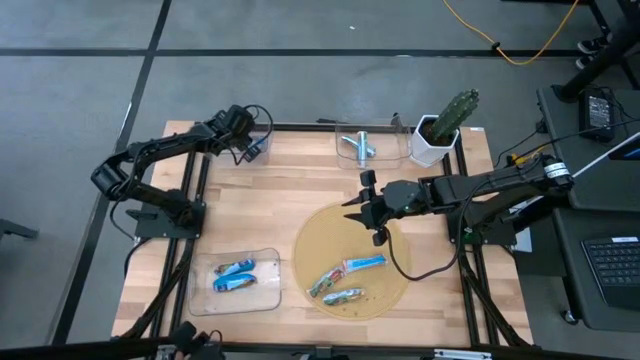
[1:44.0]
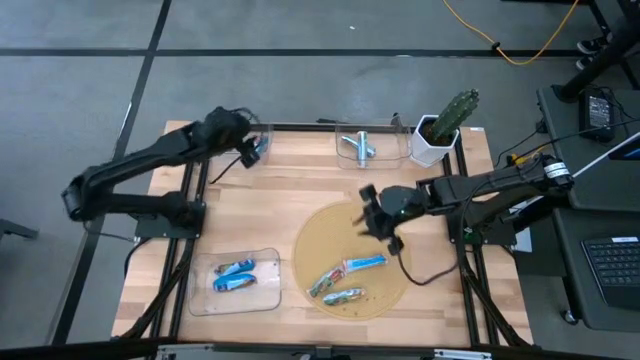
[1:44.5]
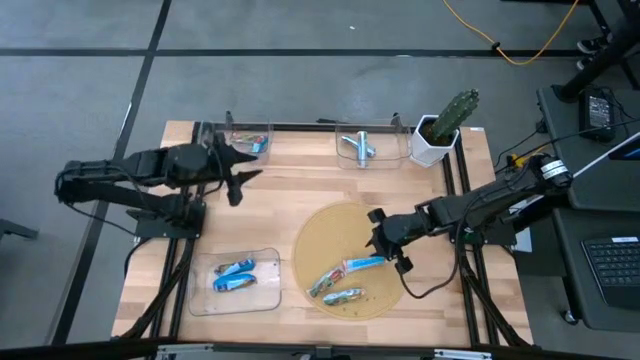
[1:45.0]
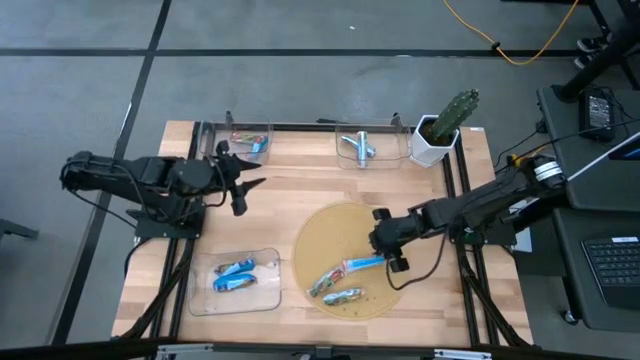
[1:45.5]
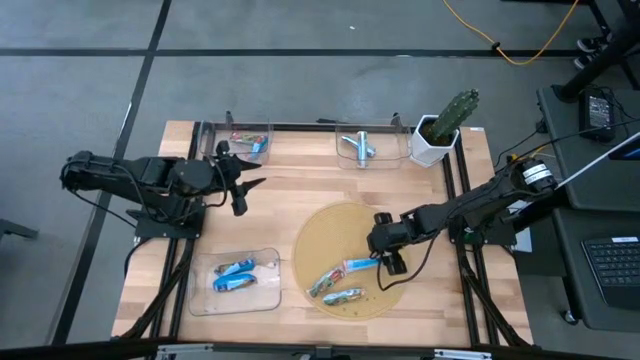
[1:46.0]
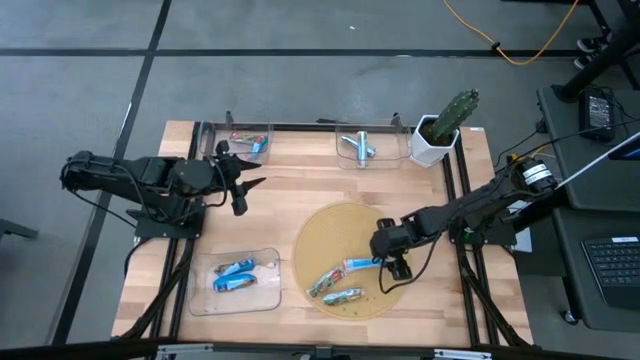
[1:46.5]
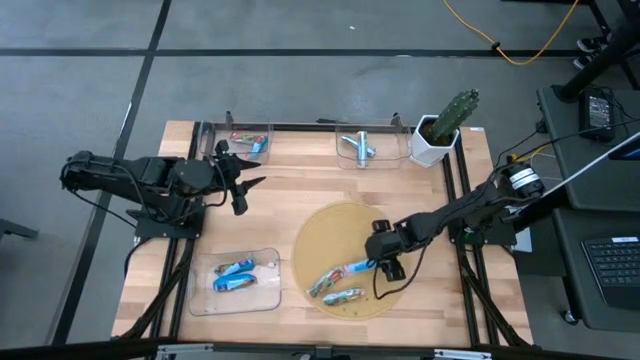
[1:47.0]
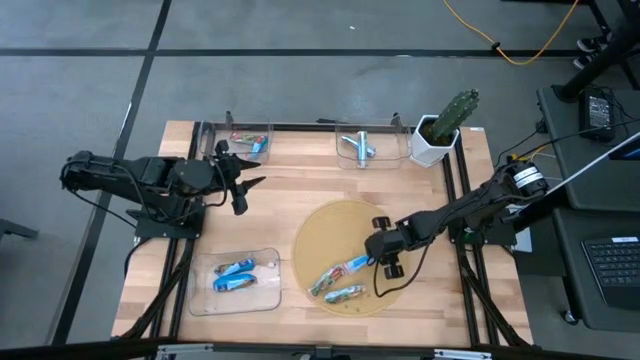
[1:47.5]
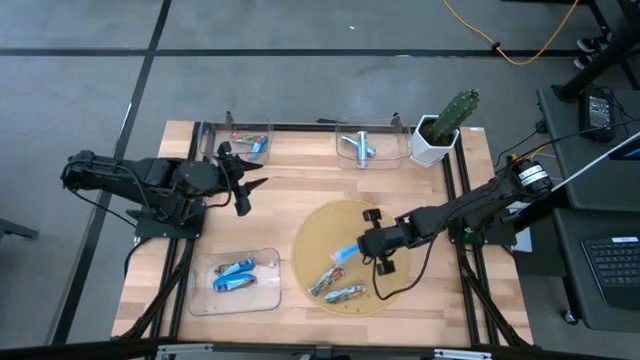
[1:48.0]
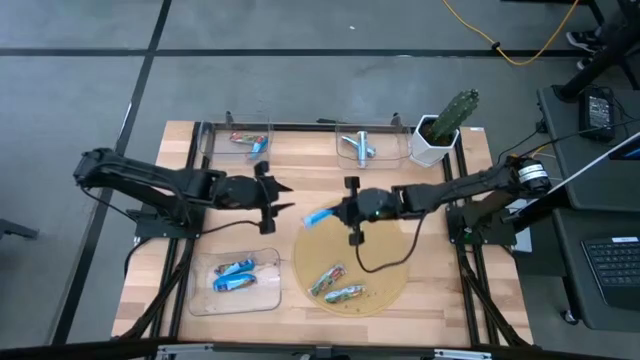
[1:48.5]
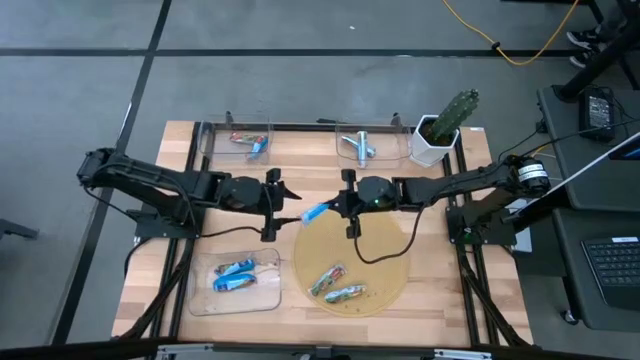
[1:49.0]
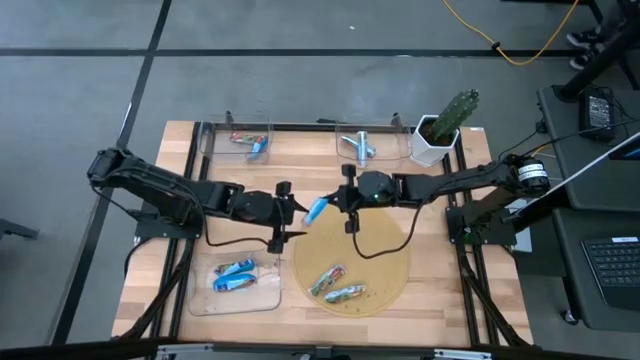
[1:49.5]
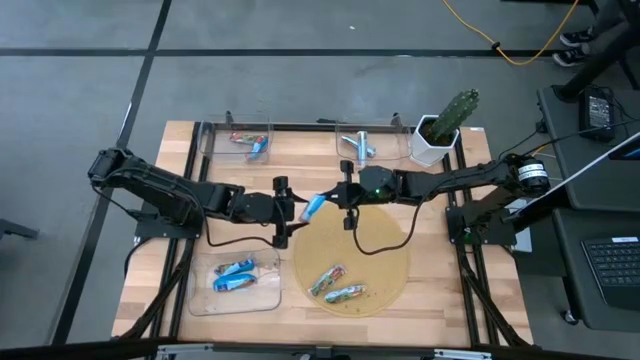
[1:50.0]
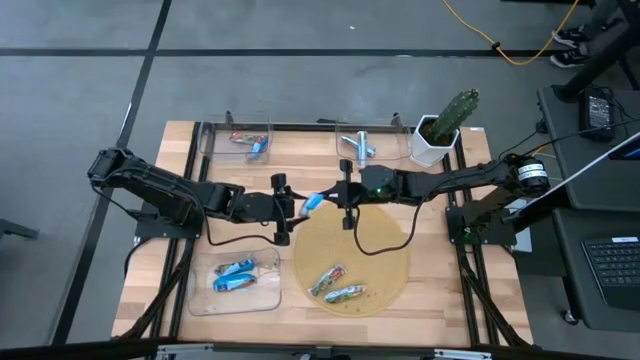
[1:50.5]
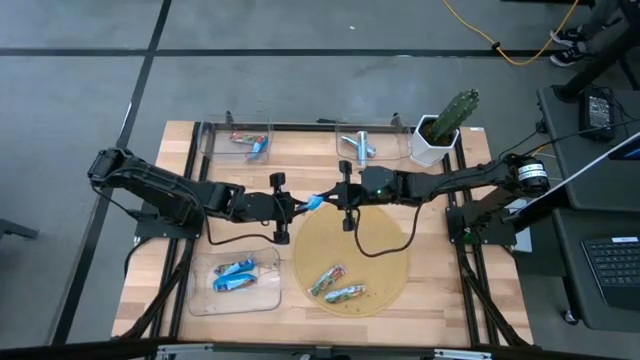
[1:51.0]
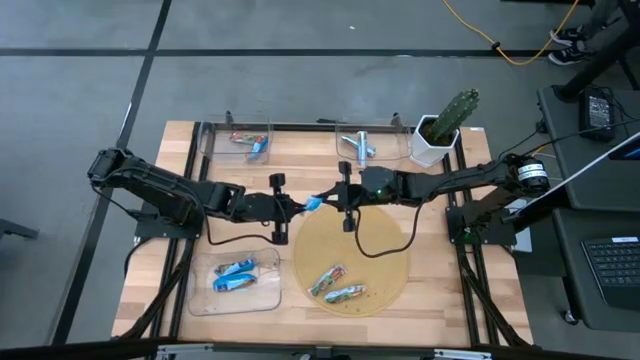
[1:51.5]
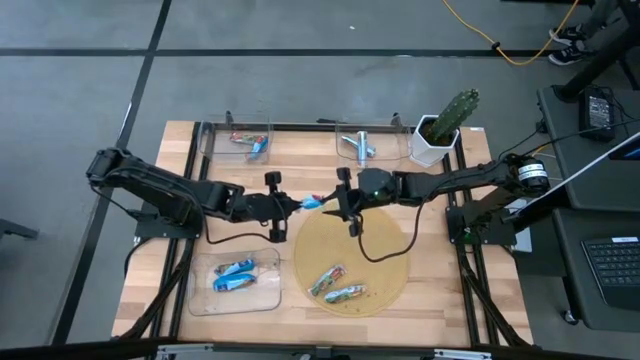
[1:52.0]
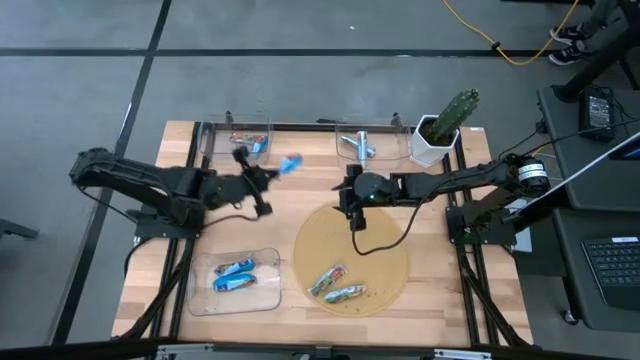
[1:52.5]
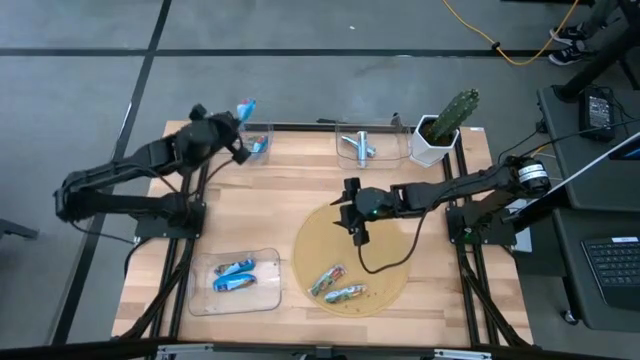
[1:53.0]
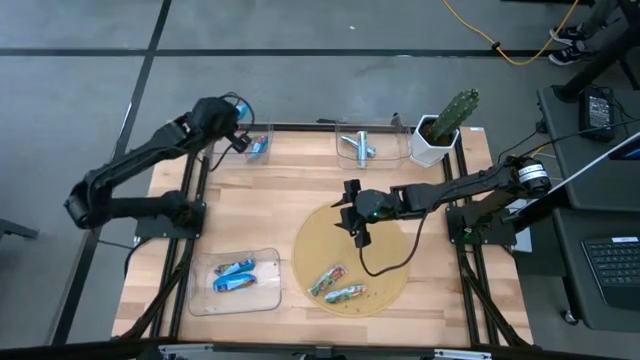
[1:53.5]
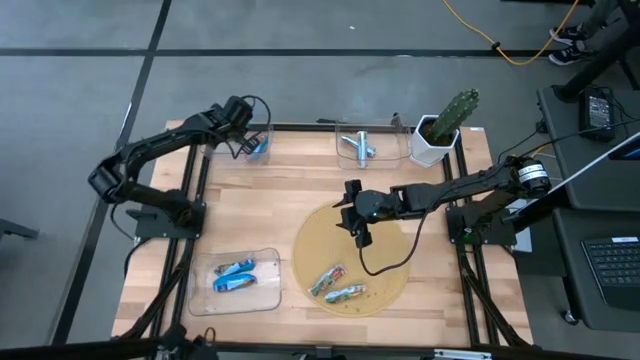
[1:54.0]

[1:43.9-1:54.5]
Task: Pick and place Granola Bars by type
Put the red granola bar into the top left transparent bin

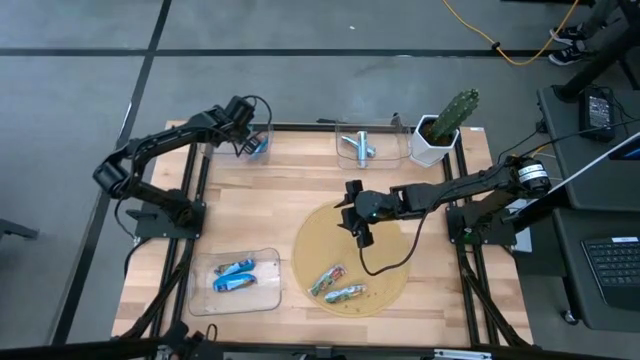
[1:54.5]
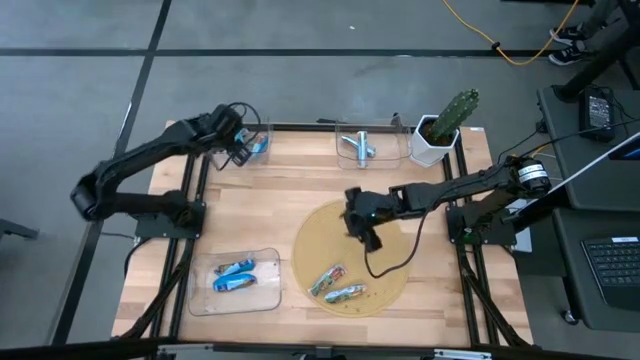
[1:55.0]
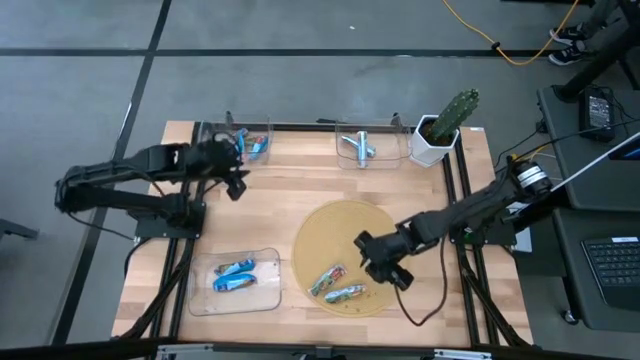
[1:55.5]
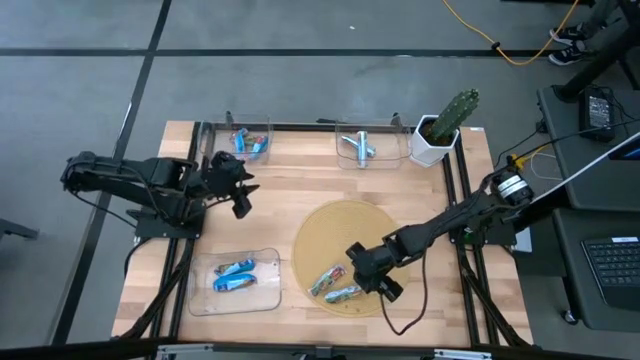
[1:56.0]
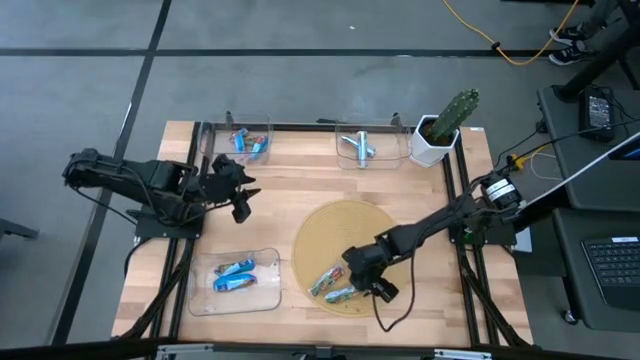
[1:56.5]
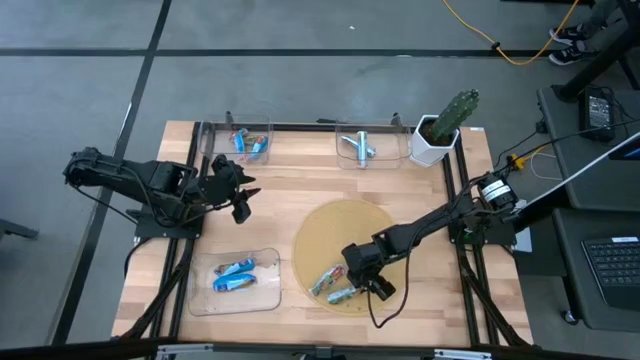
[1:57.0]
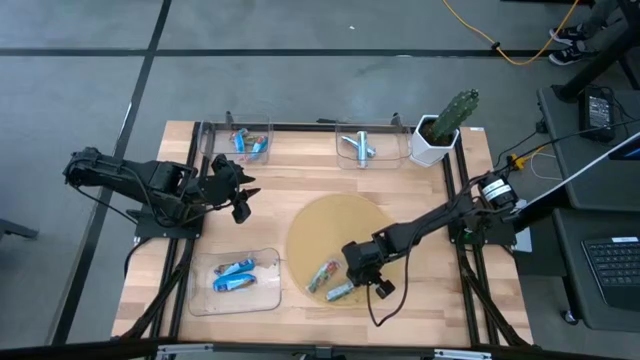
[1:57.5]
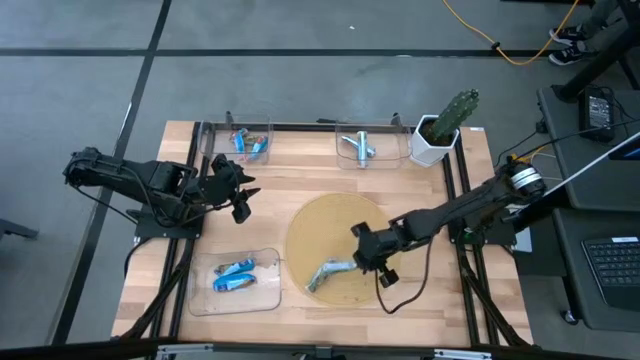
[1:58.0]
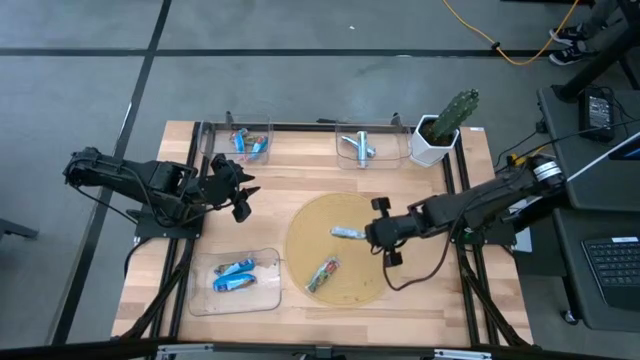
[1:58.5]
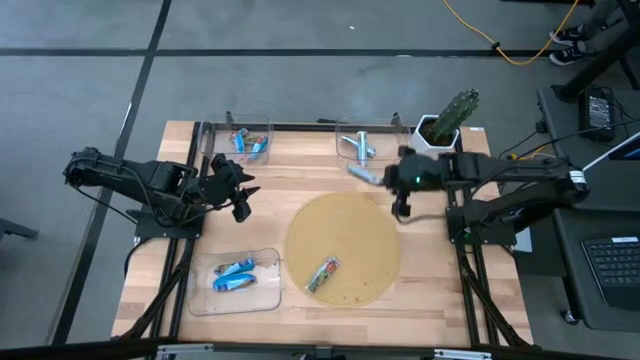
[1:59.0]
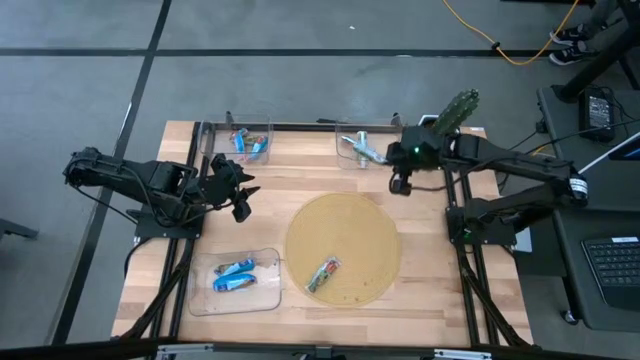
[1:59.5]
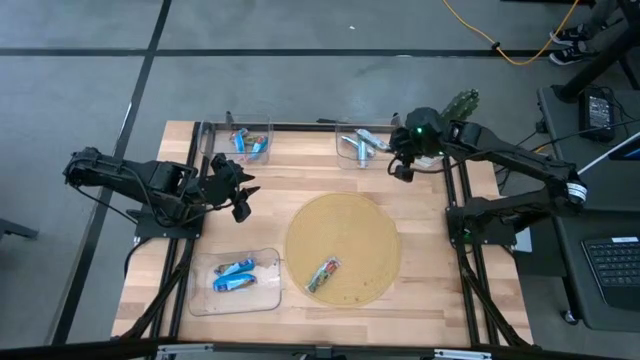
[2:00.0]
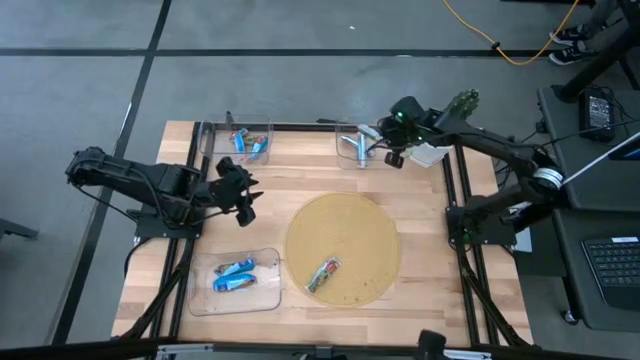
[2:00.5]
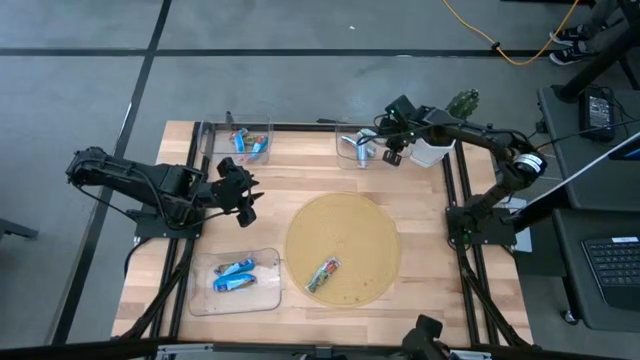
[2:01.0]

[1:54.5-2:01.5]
Put the orange granola bar into the top right transparent bin

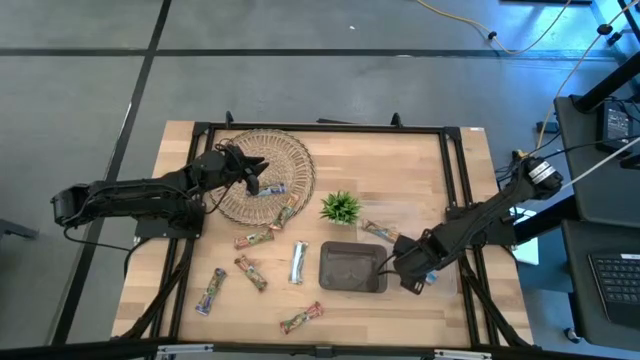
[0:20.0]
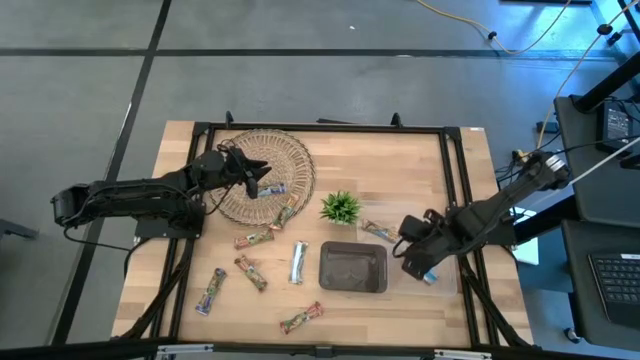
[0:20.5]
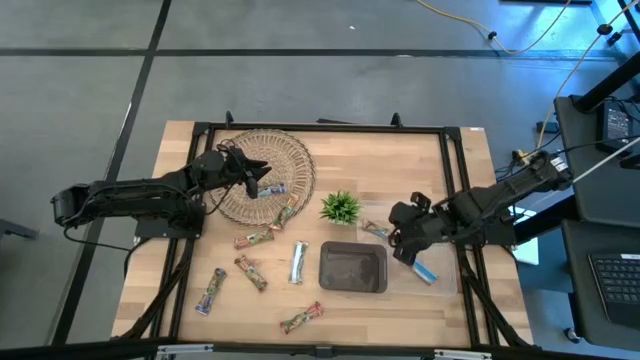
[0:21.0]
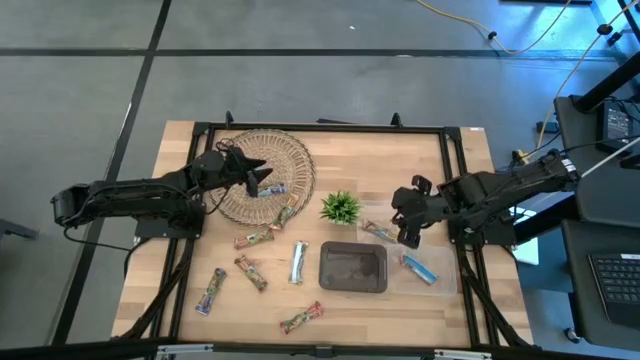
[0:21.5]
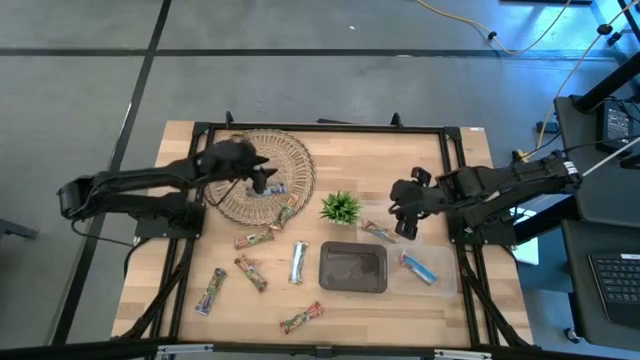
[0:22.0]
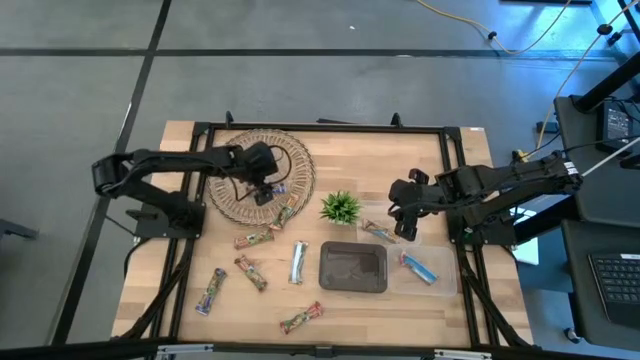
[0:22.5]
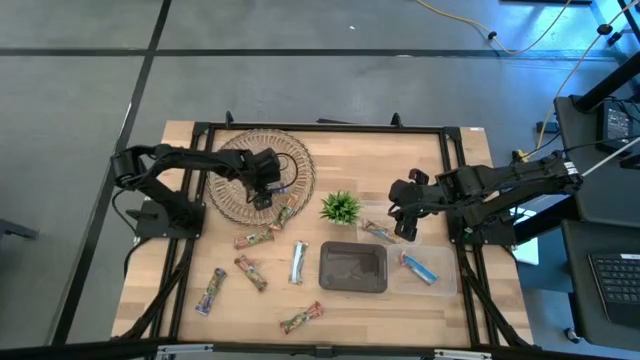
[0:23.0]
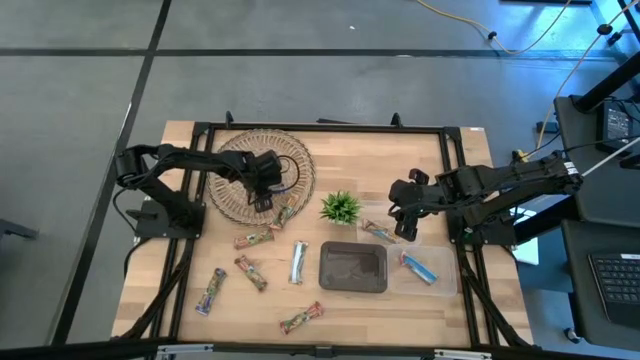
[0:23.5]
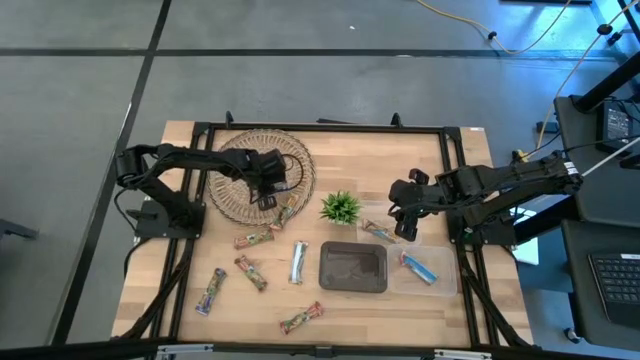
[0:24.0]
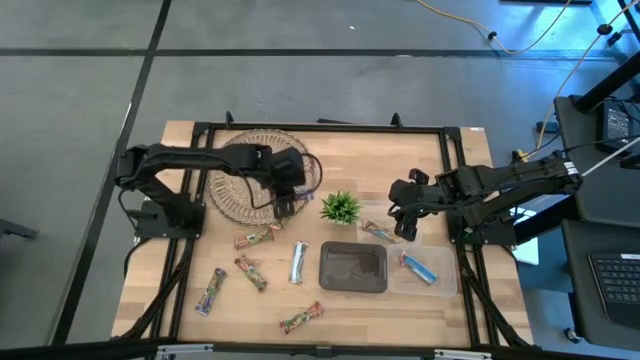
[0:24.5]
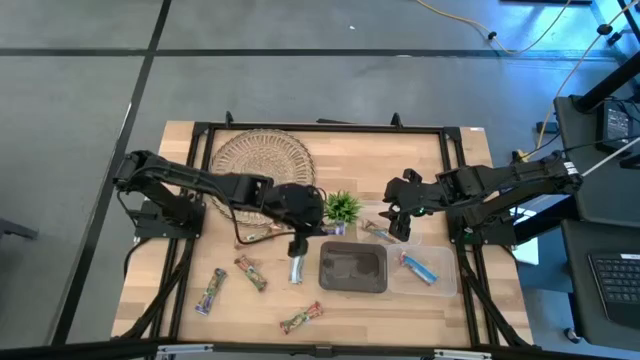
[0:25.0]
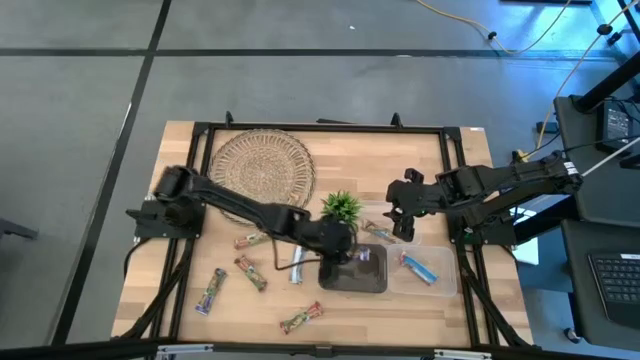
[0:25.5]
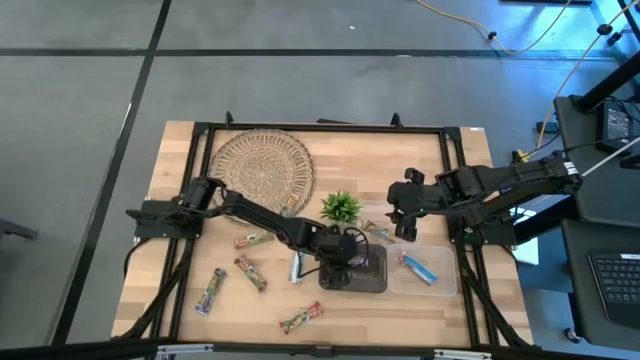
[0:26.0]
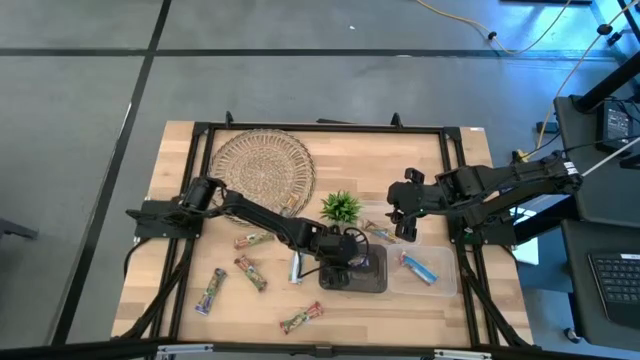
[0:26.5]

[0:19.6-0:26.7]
Task: Pick and place Granola Bars by type
Put the violet granola bar into the black bin
